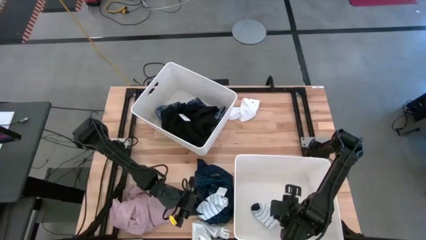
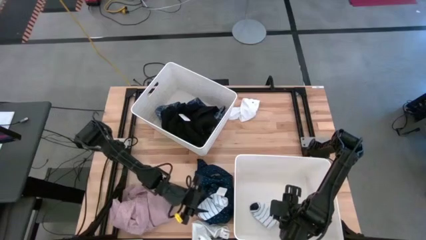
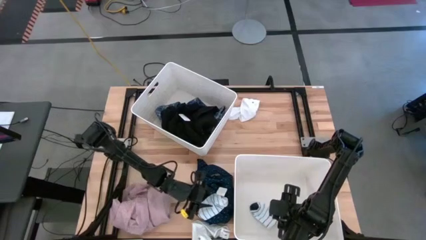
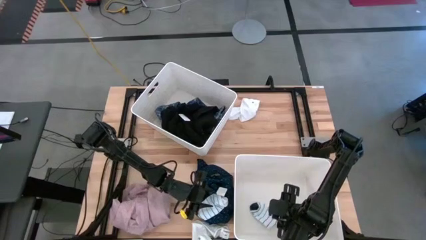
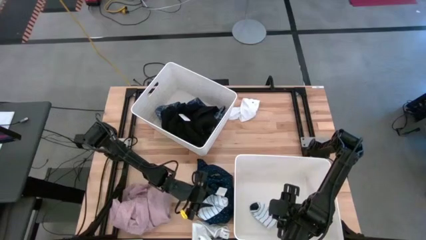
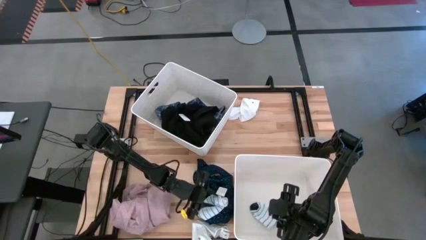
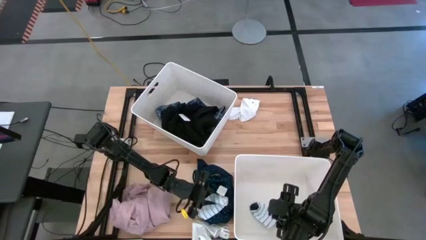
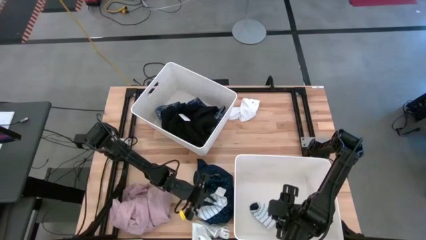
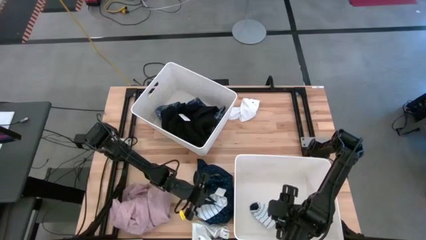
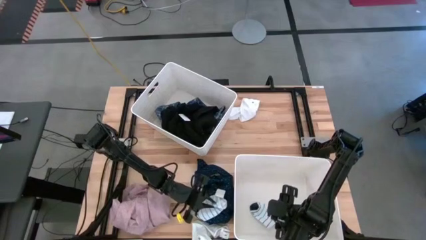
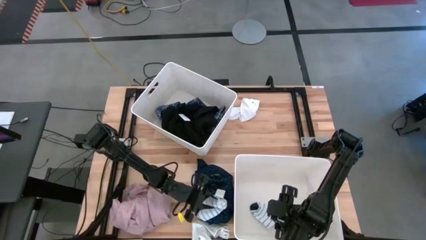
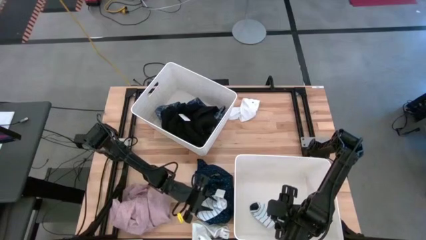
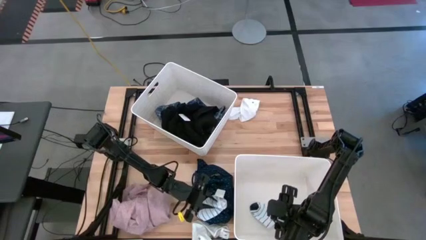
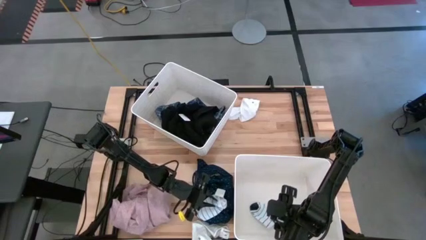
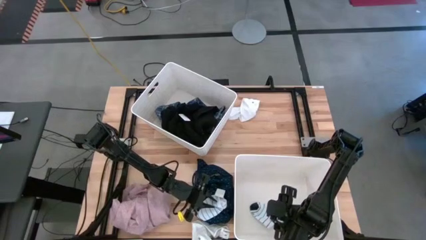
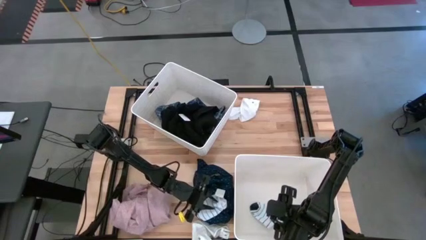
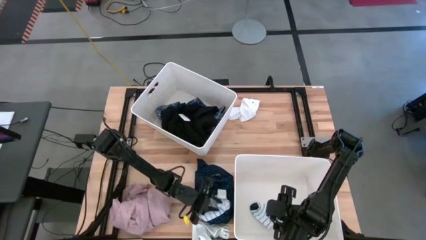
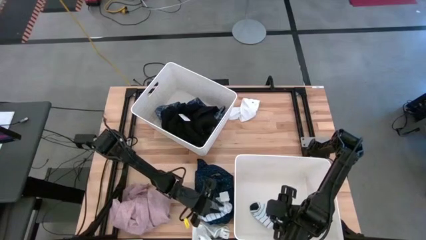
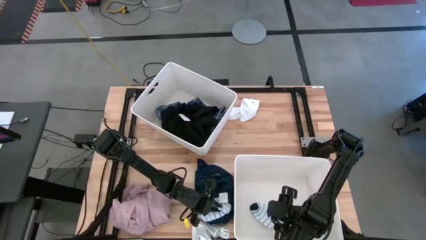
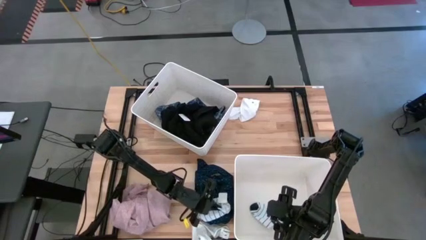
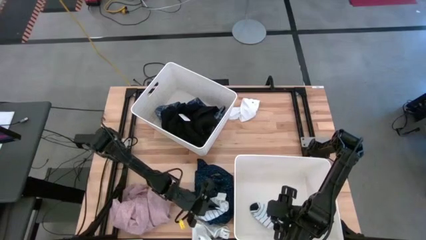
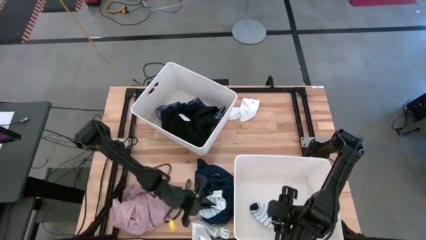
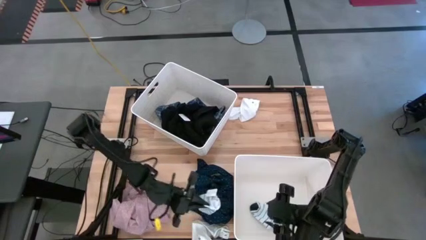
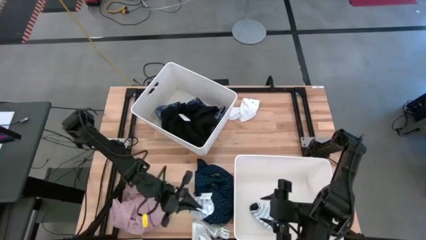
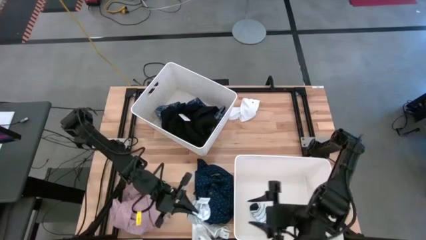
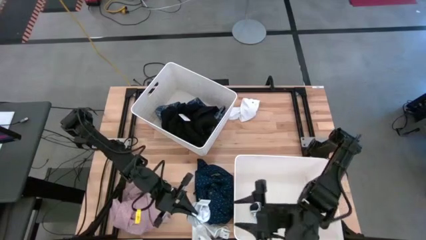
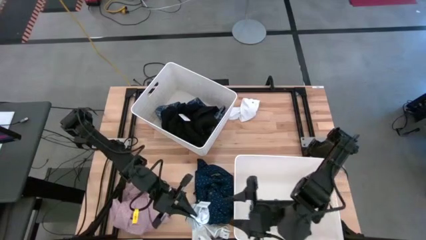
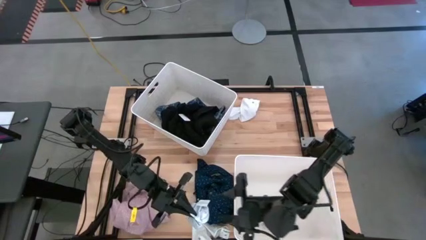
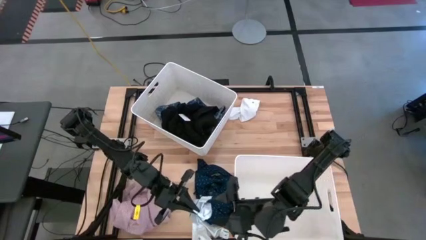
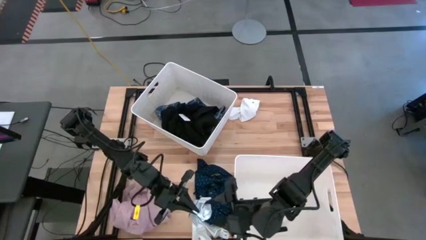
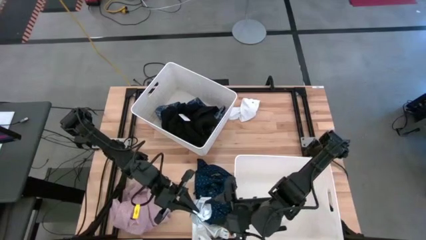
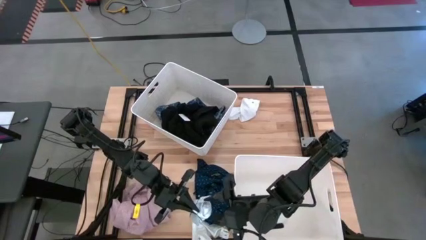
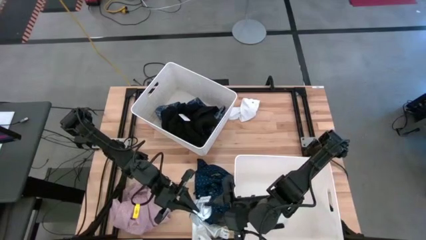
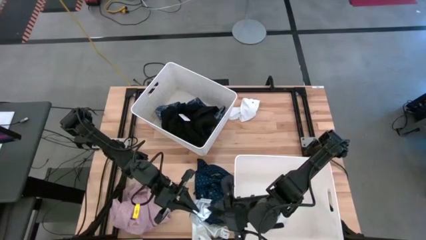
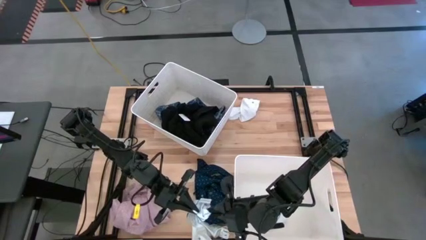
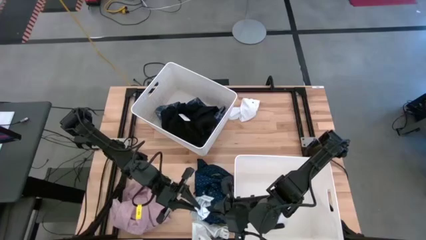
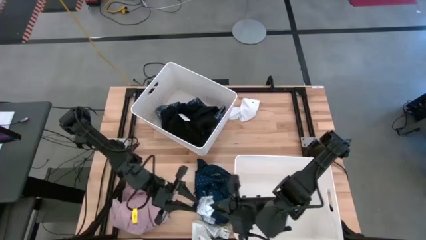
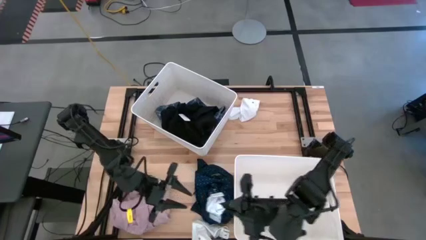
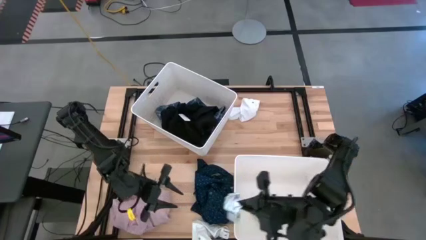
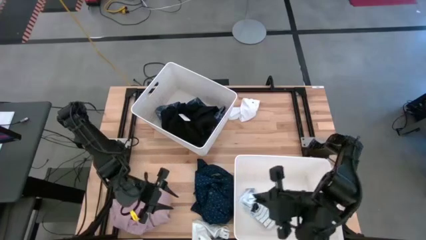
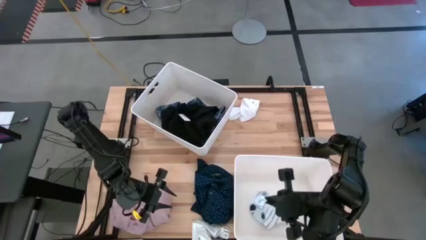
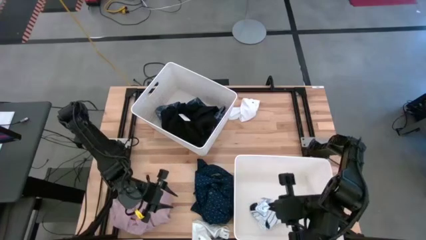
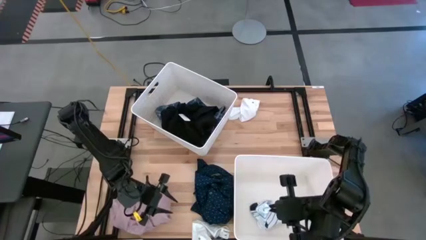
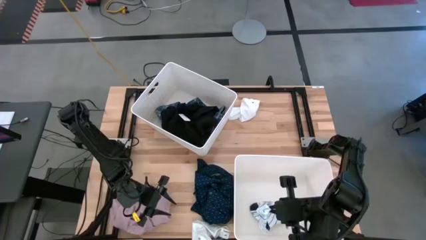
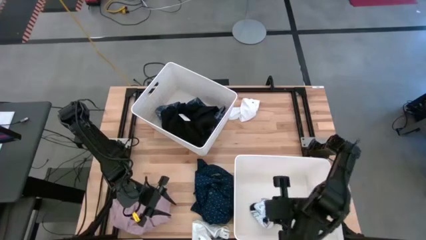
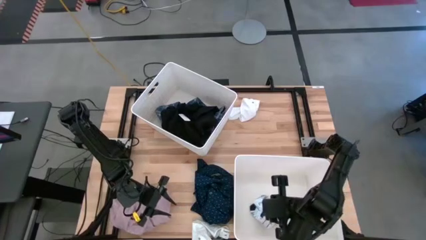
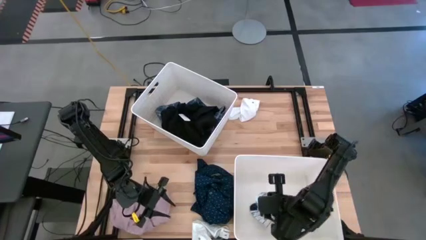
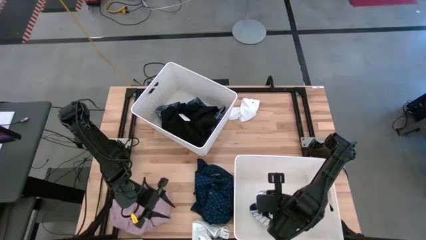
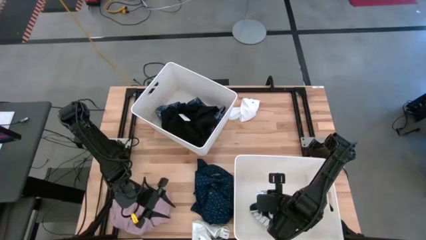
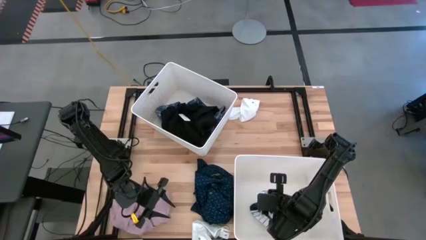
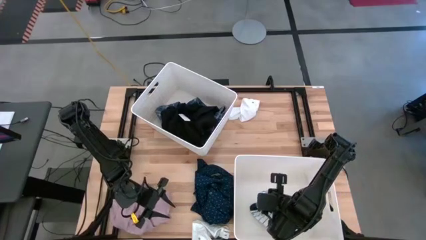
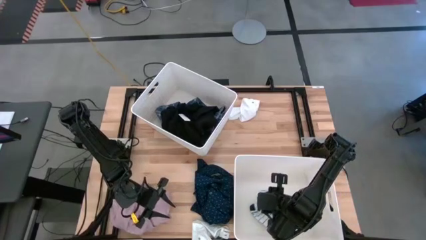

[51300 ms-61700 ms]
Task: Sort clothes
Put the white striped sock into the bottom white laundry bin

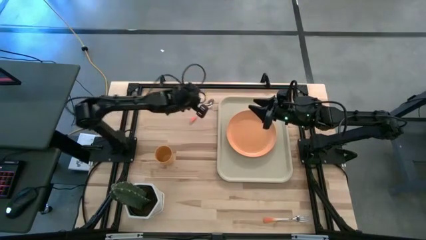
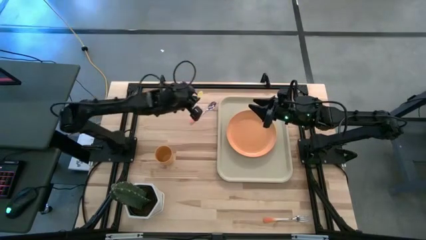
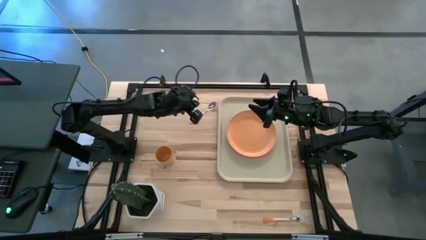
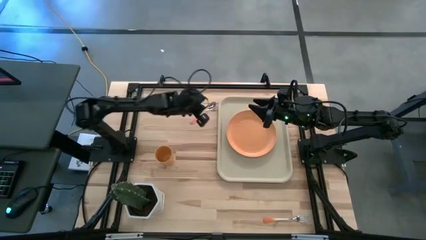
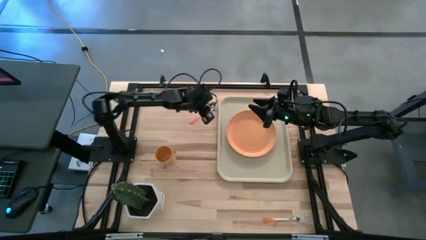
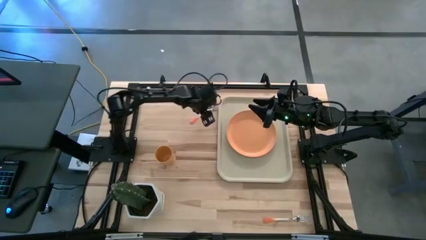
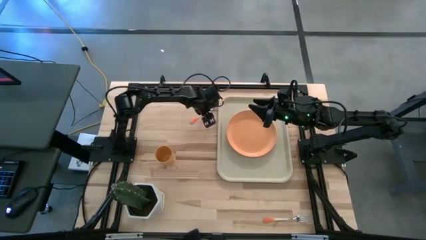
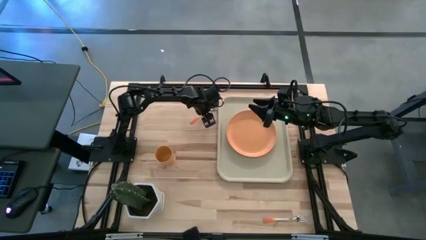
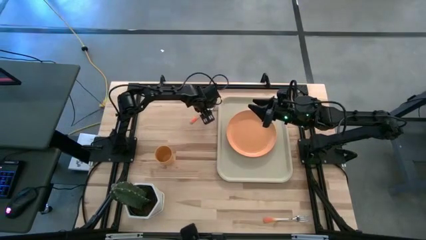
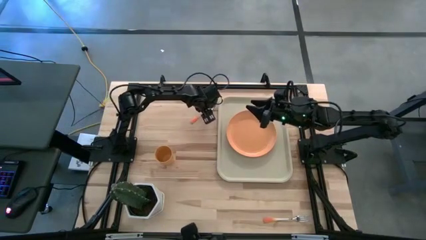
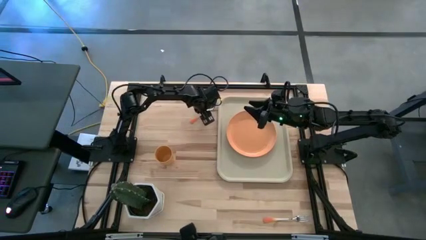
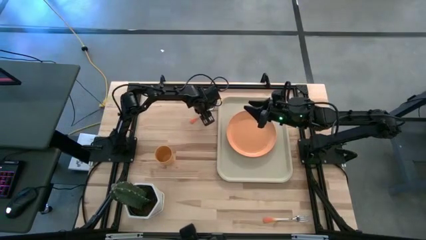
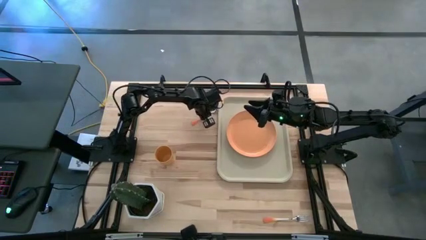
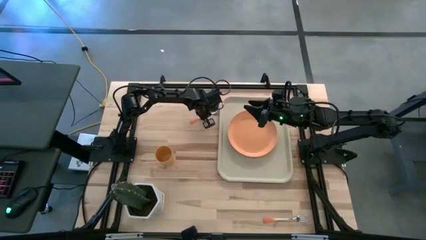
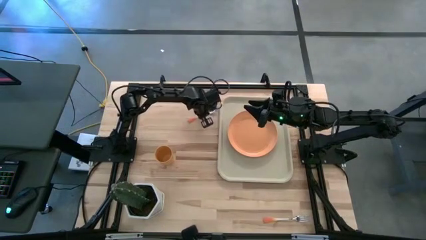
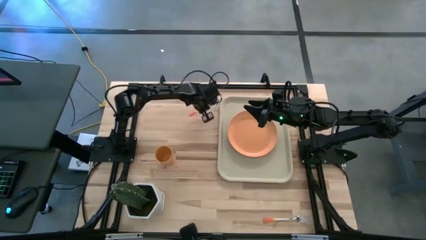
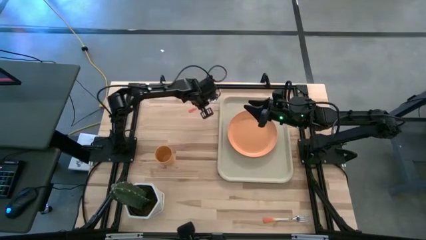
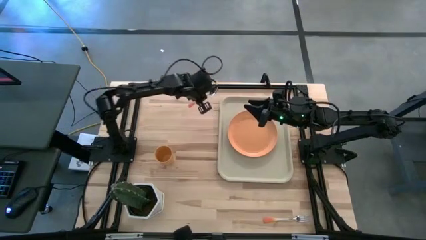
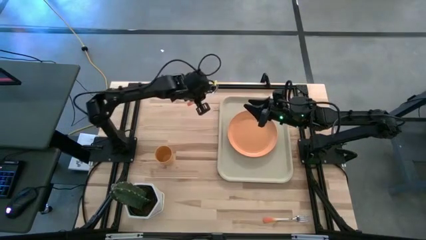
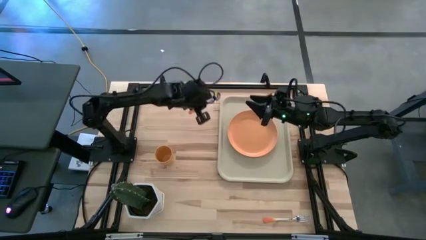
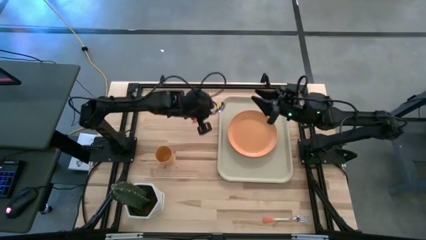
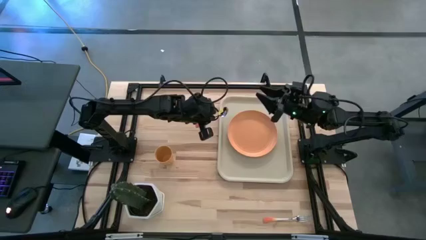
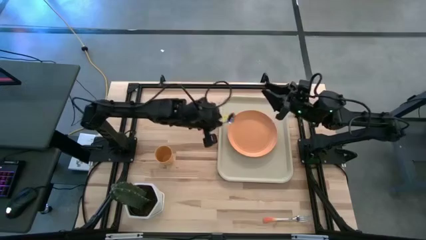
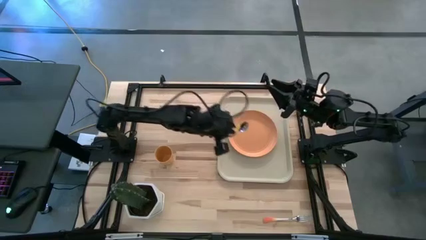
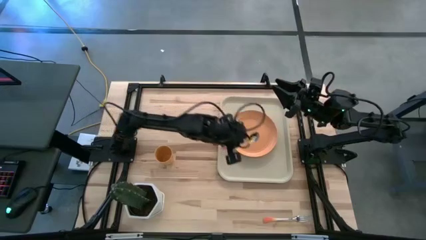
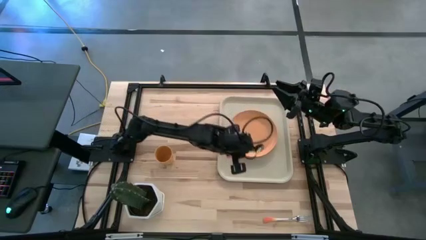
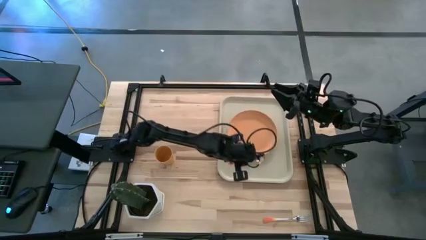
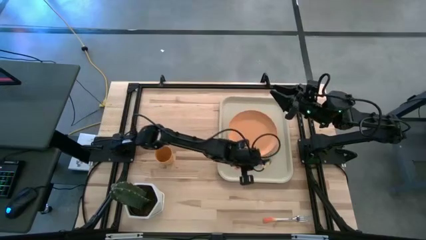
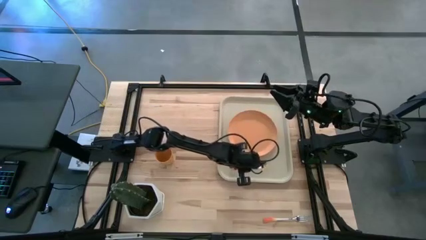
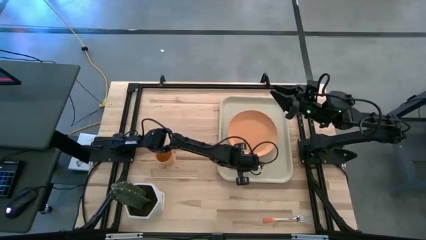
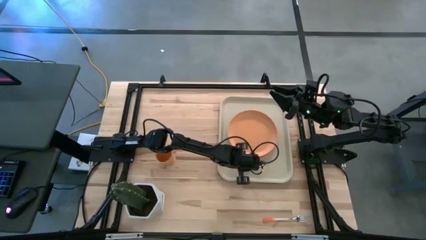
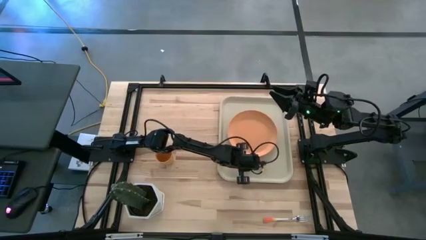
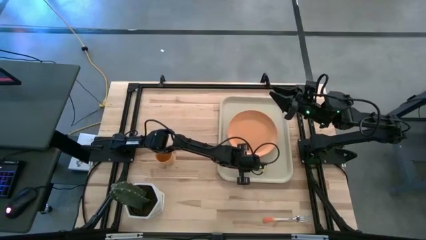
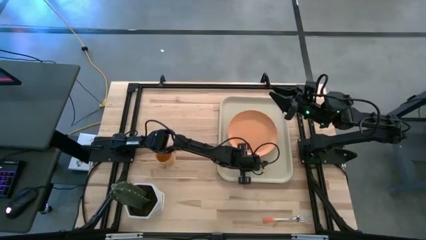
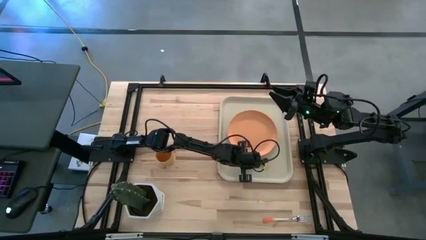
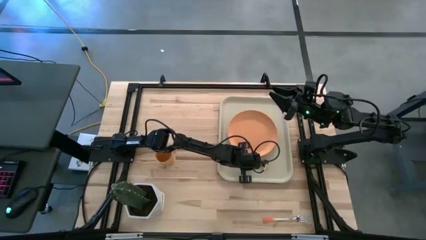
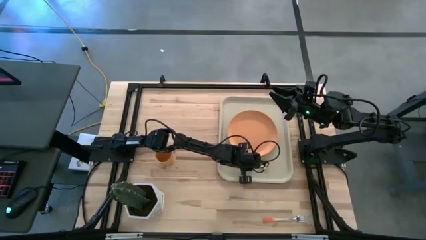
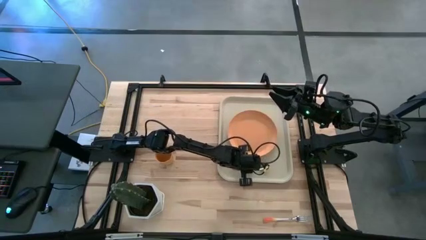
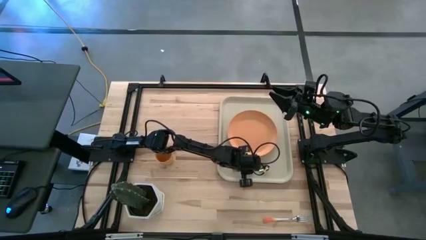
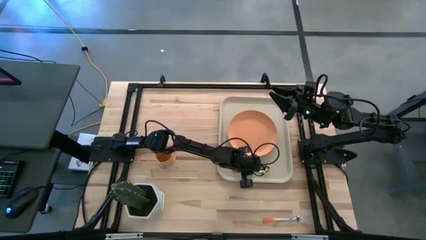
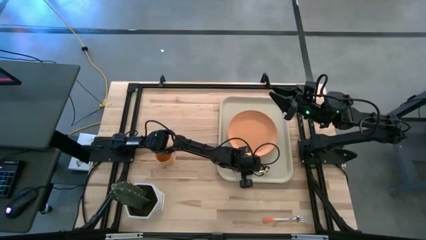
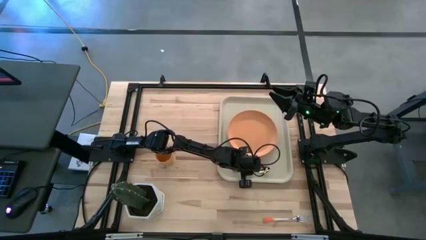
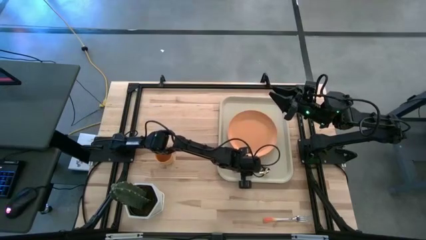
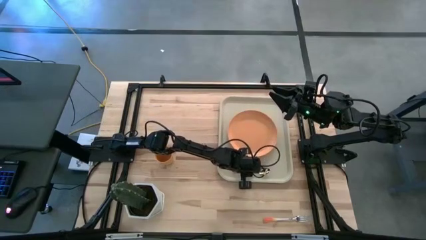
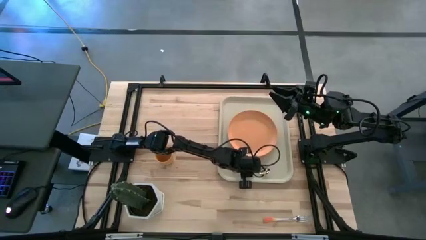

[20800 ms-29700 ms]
Task: Pick and place plate/cup/fork/spoon on tray
Put the orange spoon on the beige serving tray beside the orange plate
